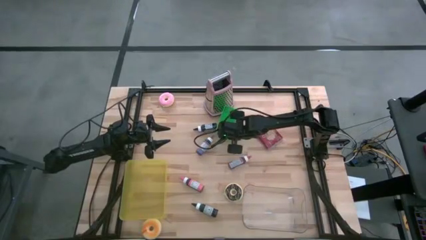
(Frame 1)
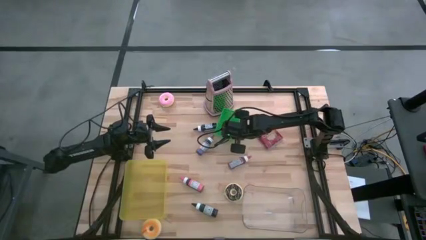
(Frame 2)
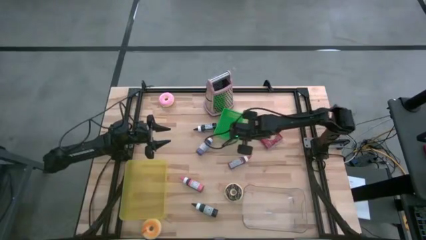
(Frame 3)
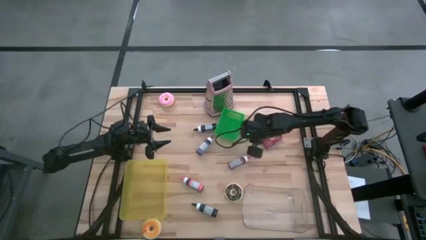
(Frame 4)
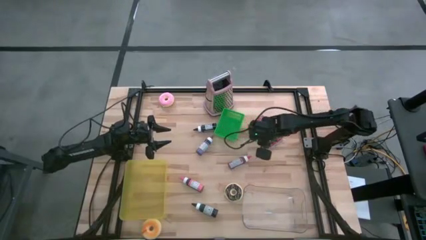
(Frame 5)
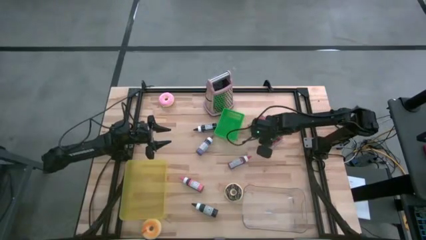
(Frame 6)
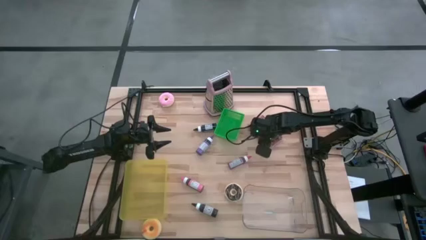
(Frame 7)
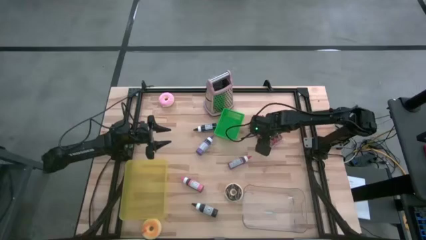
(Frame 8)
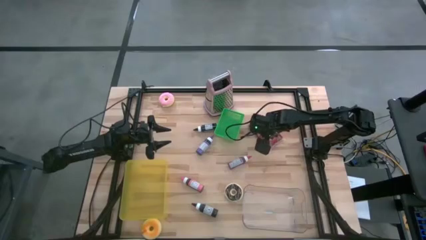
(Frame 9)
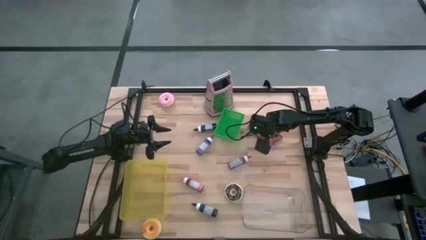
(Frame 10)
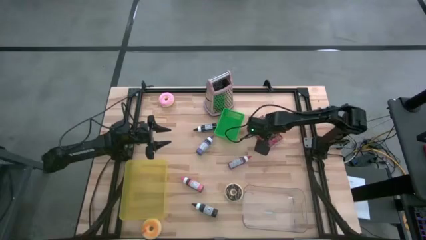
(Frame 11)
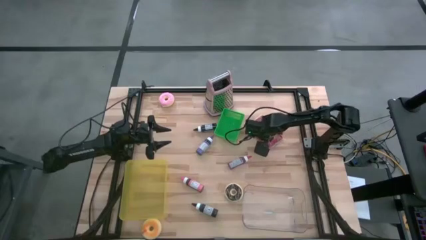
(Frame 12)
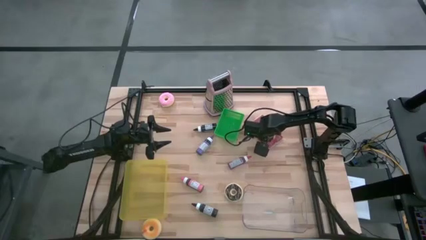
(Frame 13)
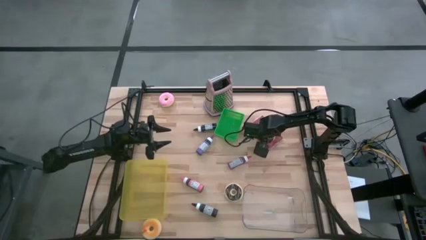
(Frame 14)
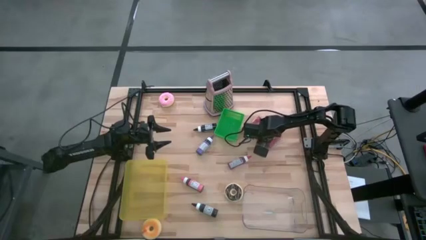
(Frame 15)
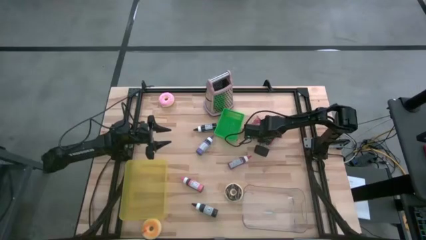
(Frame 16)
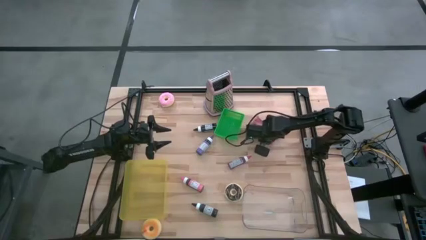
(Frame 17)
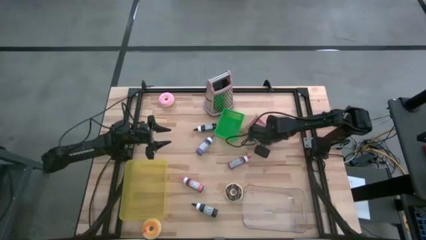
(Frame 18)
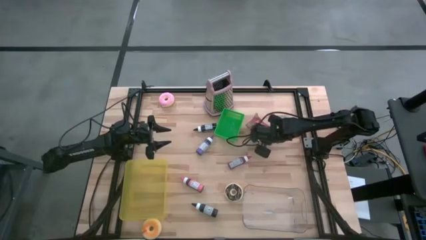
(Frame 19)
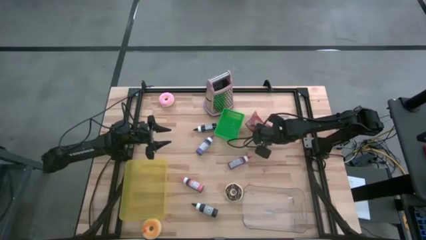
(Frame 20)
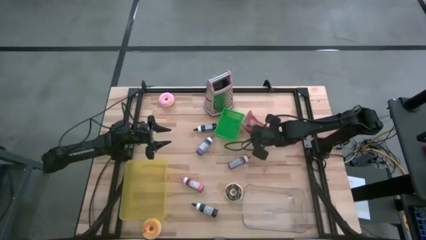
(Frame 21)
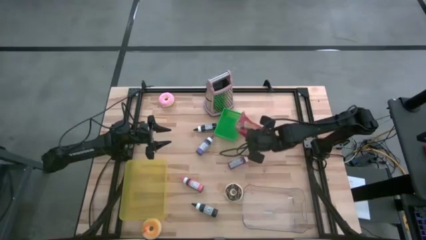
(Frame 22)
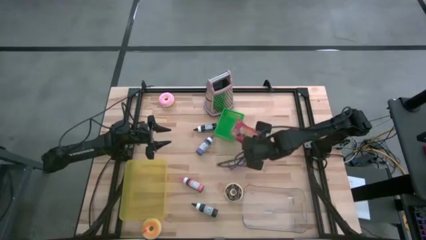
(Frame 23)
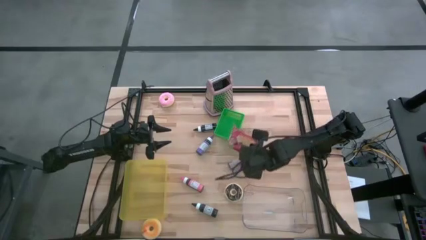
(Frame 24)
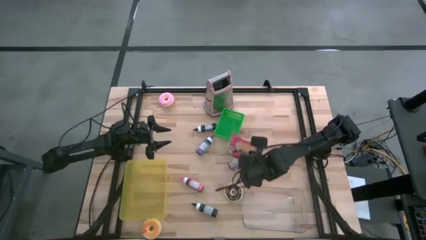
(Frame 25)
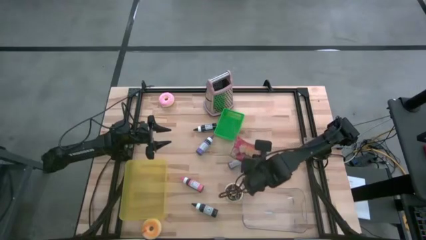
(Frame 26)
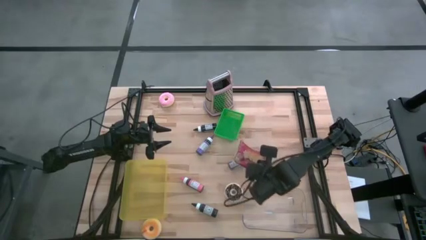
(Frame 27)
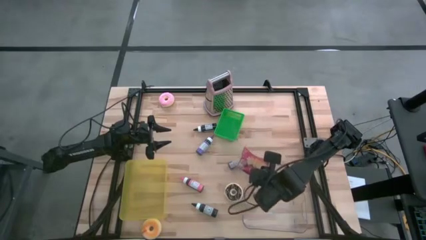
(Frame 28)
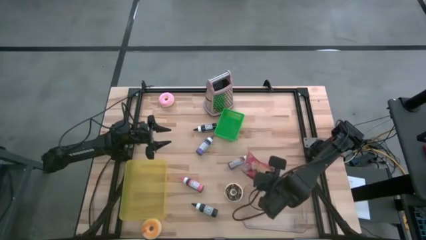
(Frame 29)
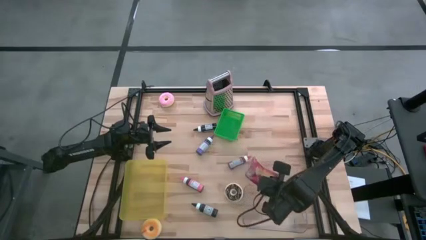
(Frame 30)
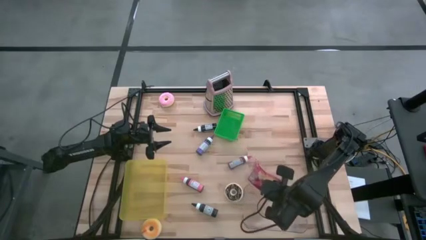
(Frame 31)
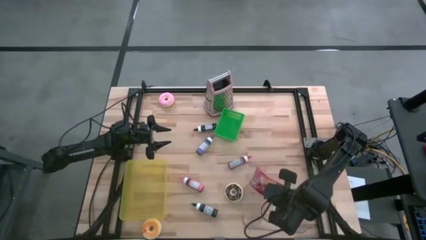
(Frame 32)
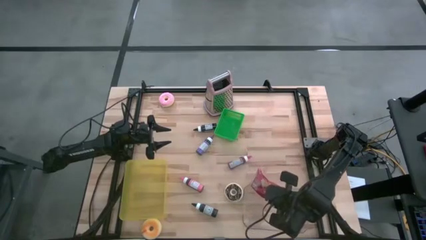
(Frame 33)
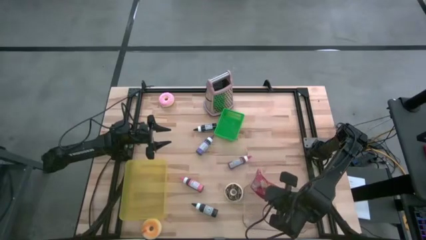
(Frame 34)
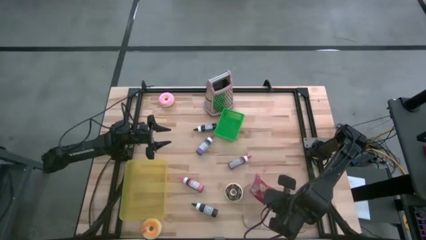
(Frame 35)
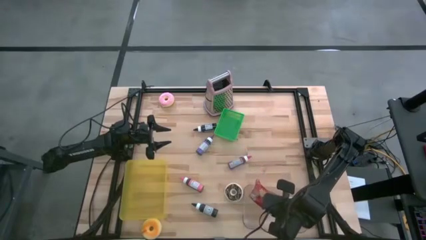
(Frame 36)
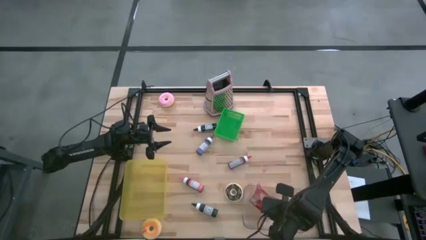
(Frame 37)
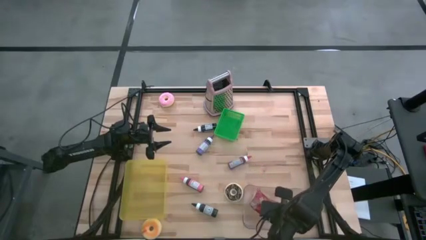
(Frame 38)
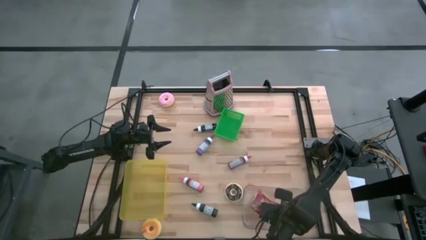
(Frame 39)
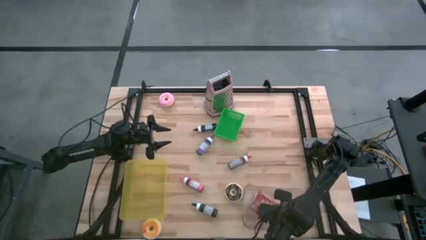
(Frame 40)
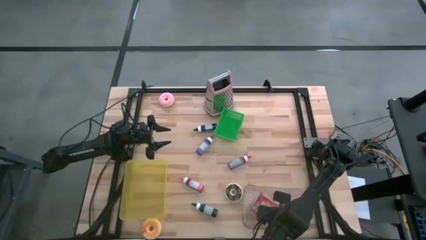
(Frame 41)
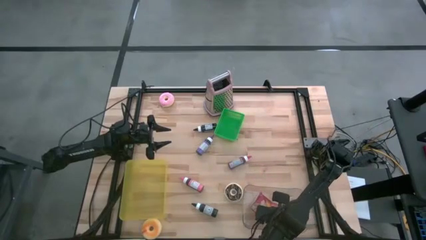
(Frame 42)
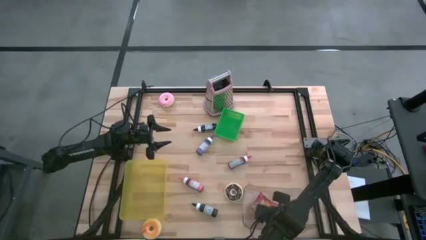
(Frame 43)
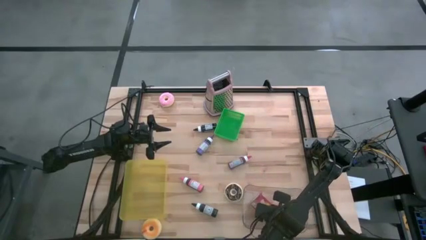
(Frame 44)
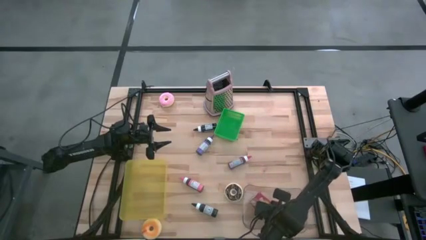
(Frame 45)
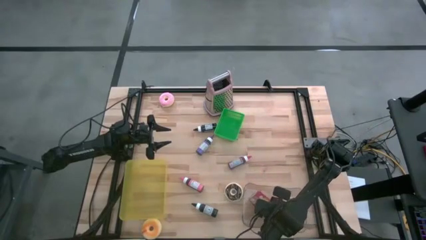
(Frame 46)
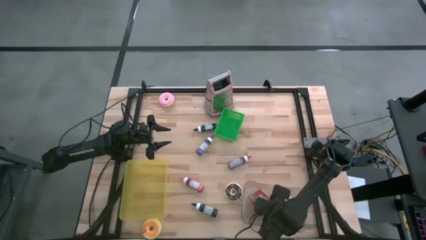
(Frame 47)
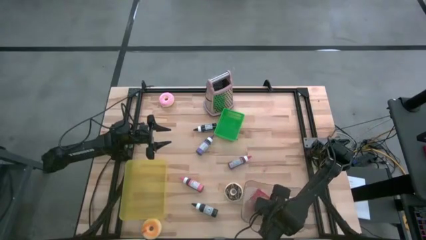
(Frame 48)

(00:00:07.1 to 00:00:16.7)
Task: Pick & Place Food Item
Put the red popcorn pack into the transparent bin

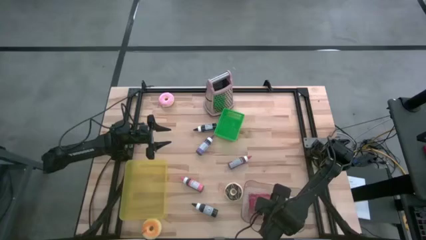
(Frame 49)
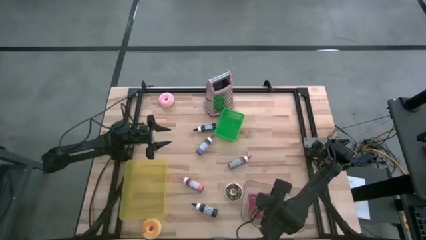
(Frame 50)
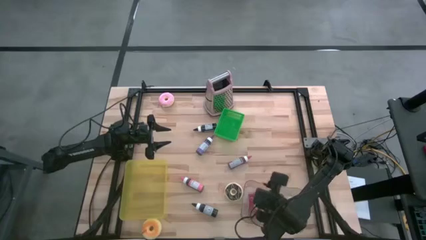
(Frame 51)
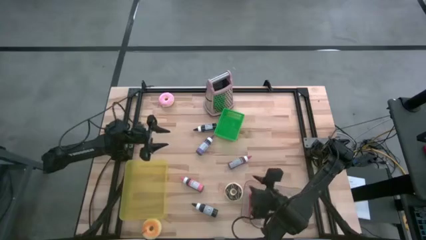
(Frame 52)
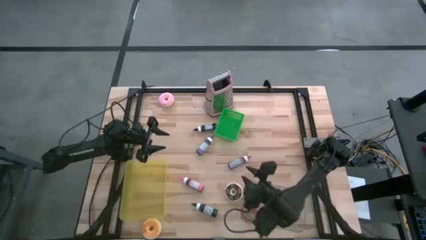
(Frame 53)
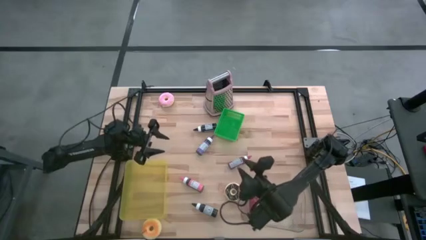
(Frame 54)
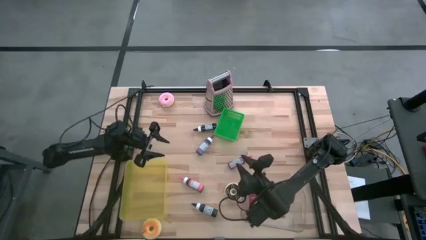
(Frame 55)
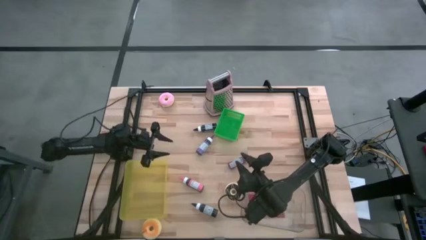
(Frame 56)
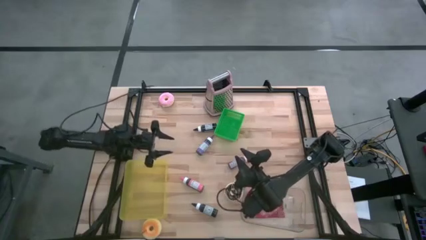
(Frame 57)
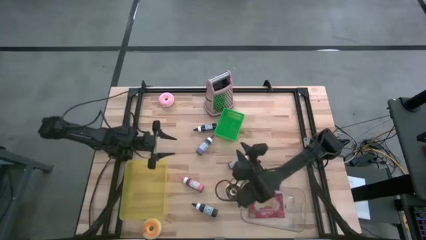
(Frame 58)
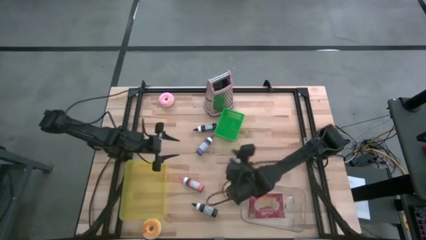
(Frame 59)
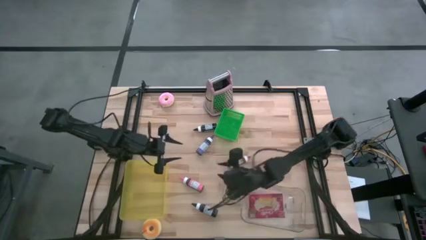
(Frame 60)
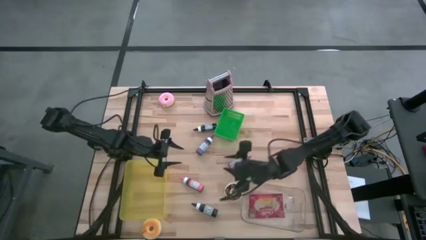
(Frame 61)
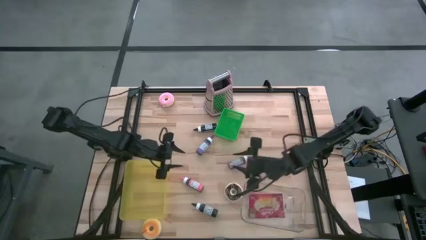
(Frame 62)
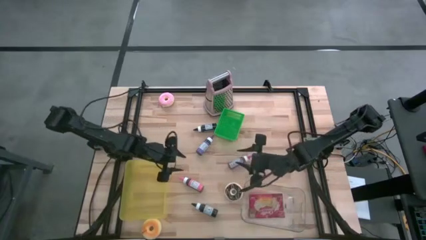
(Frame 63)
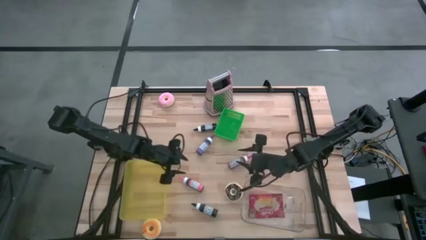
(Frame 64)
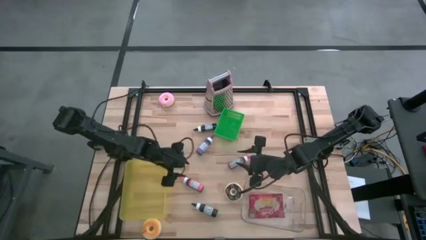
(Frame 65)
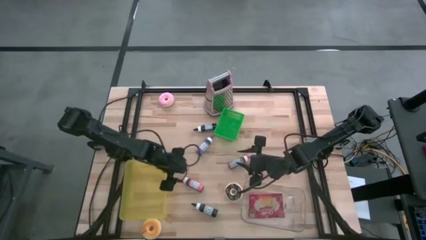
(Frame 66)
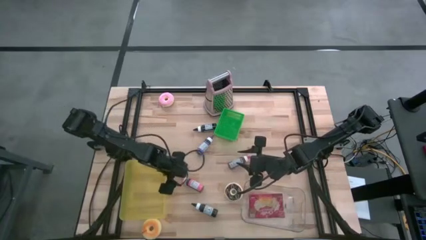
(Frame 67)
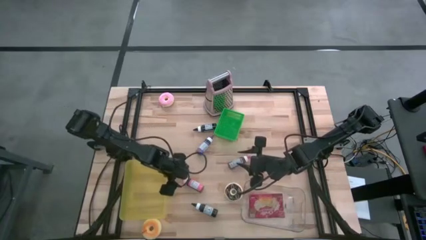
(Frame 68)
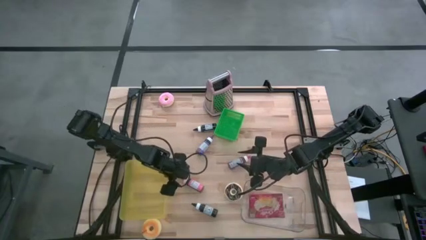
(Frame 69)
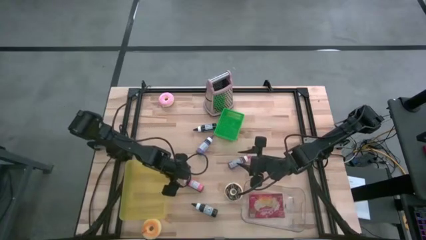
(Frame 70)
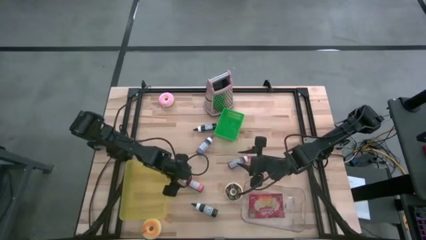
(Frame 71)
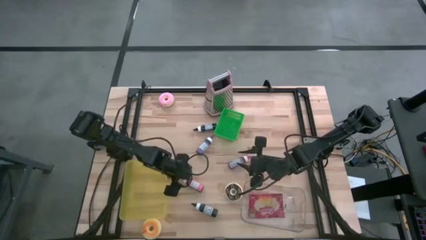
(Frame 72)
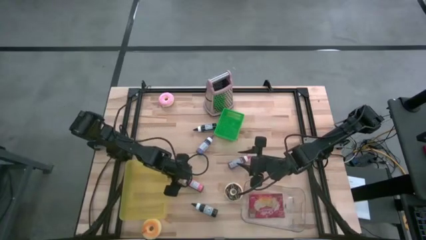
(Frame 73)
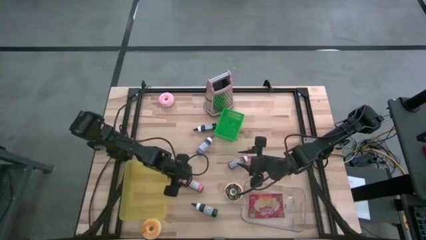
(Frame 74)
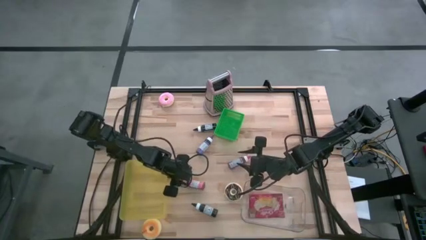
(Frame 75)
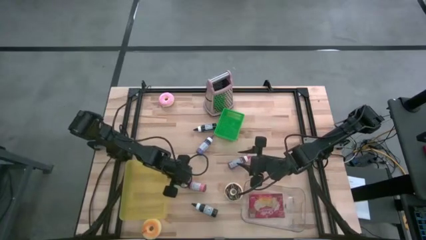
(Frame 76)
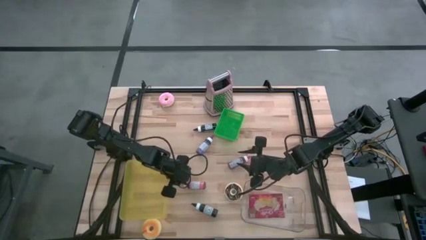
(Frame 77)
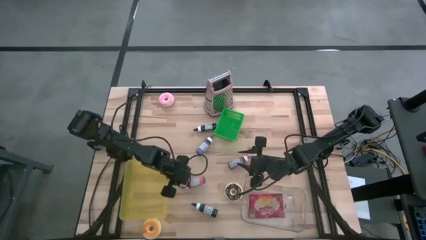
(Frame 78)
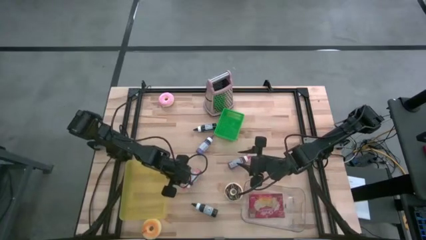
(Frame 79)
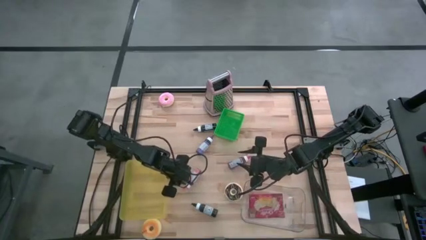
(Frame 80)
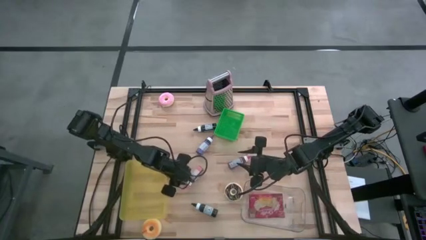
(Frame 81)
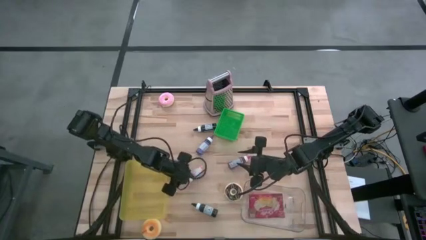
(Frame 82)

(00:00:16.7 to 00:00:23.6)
Put the pink ink bottle into the yellow bin
